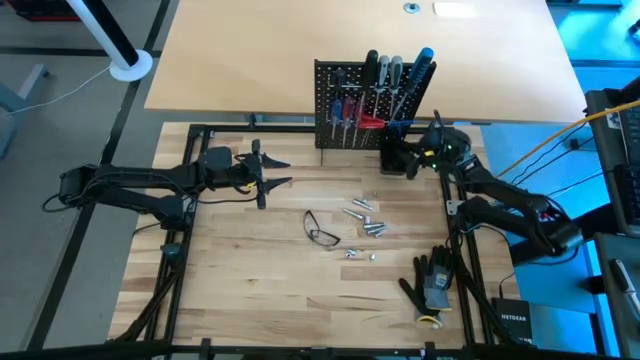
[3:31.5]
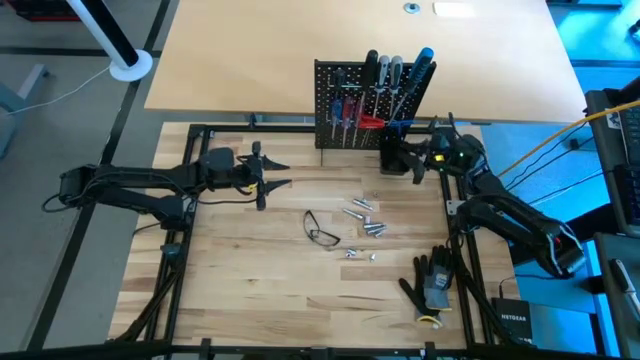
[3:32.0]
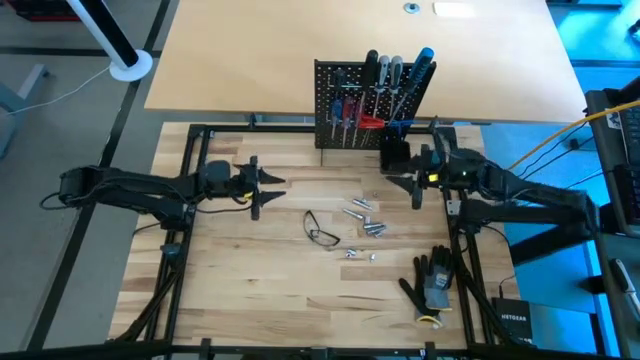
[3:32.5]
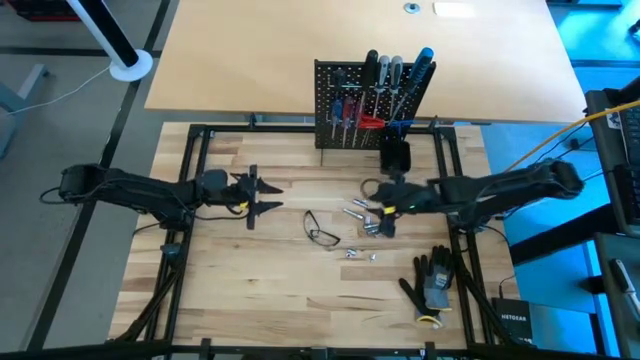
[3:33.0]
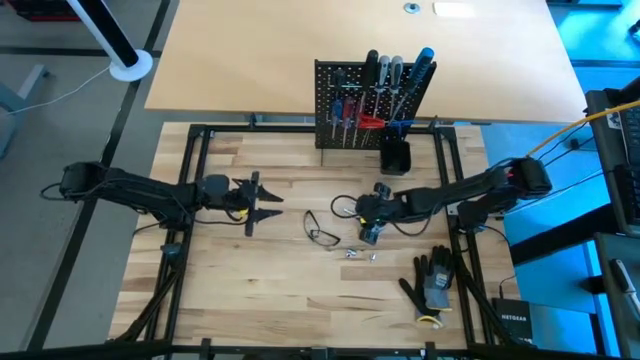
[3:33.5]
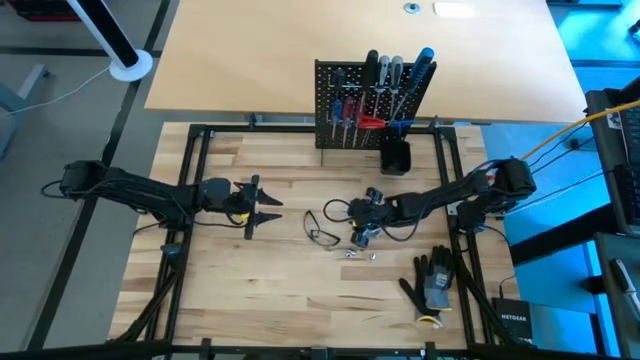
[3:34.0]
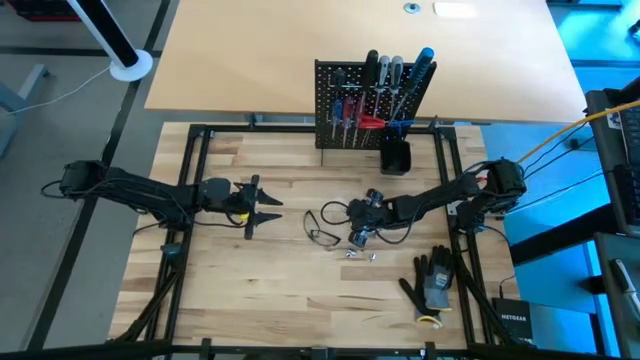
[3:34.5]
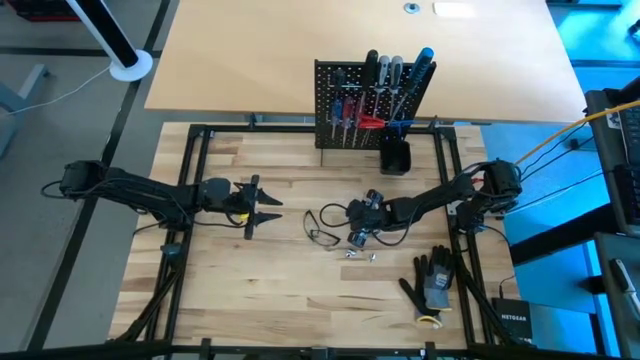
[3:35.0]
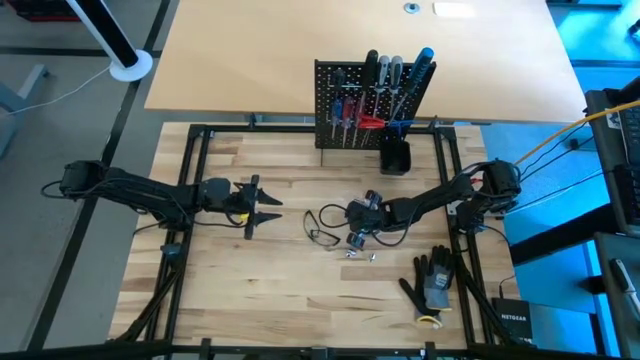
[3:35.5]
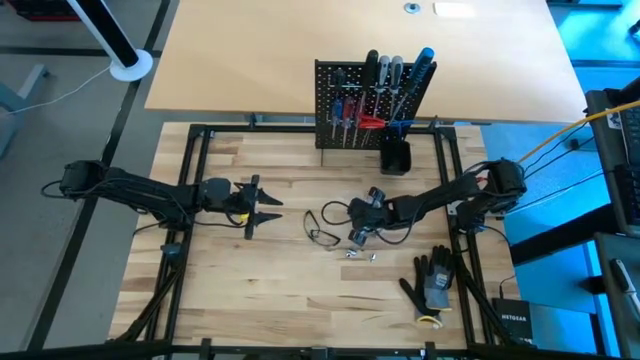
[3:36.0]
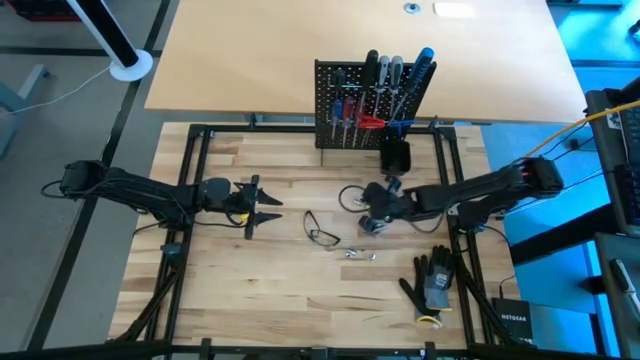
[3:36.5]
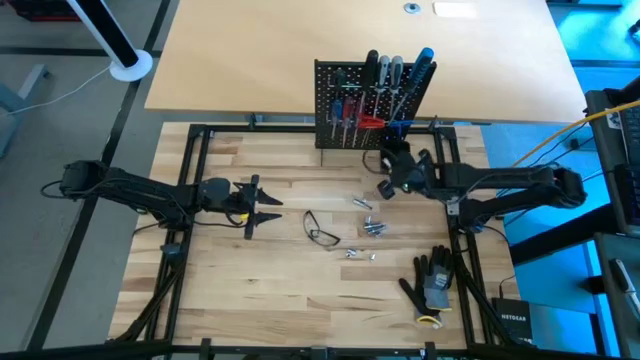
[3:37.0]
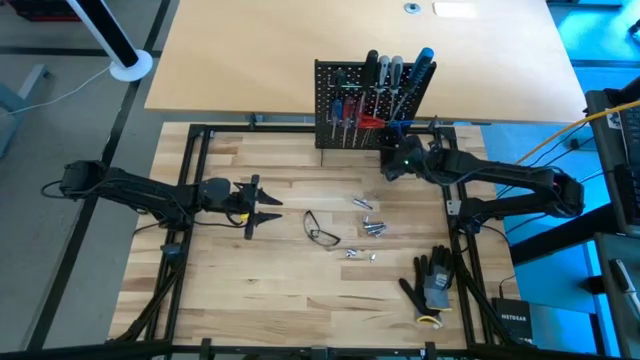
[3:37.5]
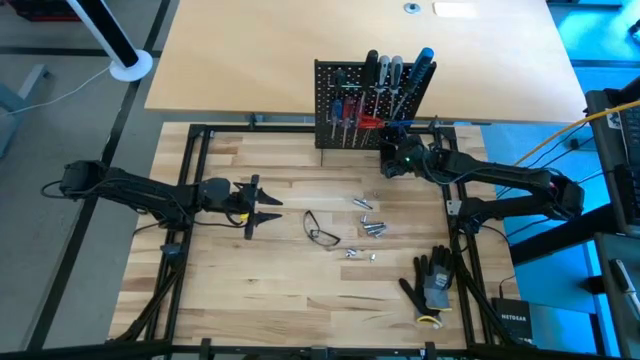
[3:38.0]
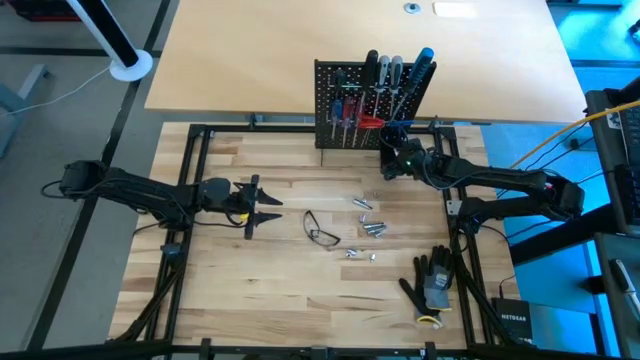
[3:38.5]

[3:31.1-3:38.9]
Task: Hang tools onto peg board
Put the silver extension bar in the black bin on the peg board

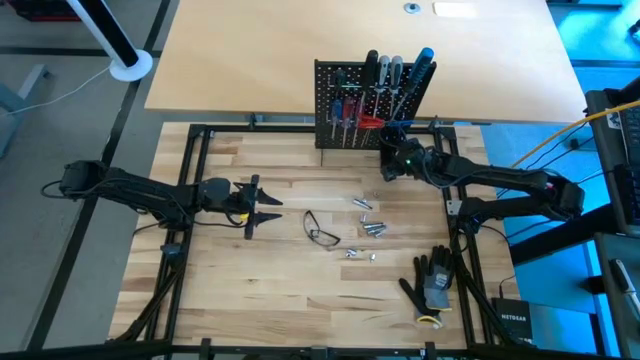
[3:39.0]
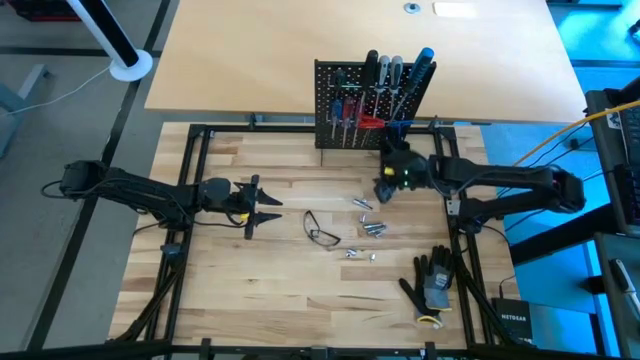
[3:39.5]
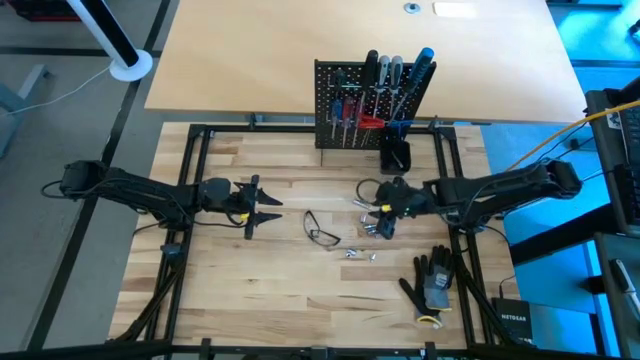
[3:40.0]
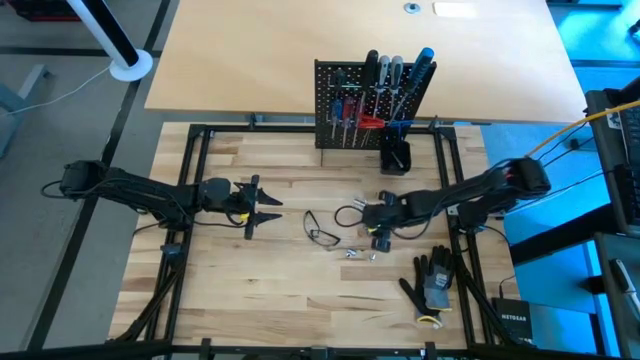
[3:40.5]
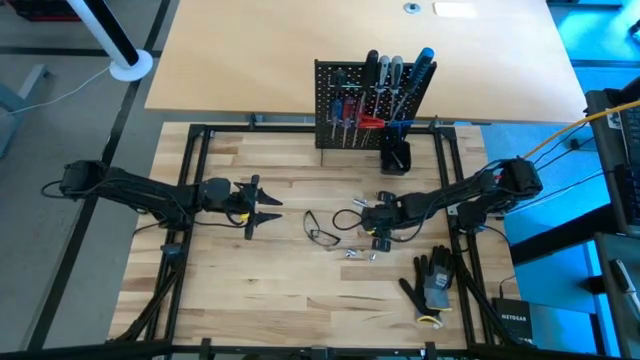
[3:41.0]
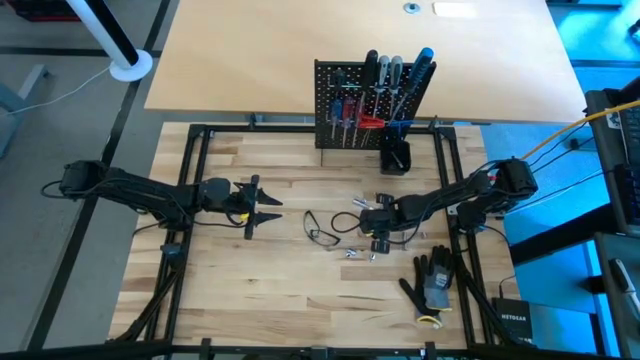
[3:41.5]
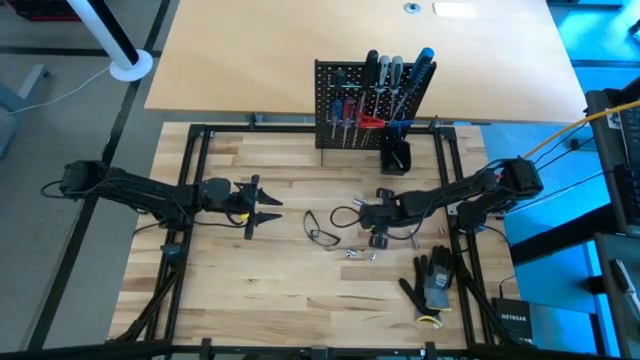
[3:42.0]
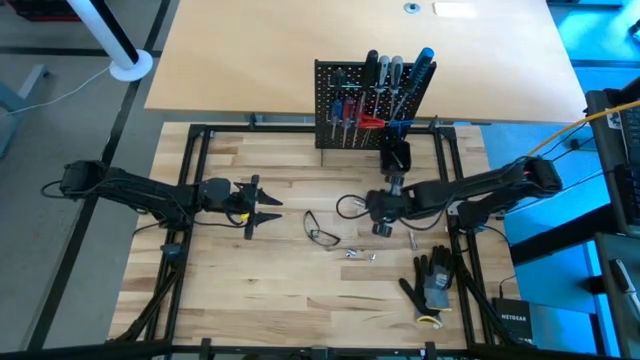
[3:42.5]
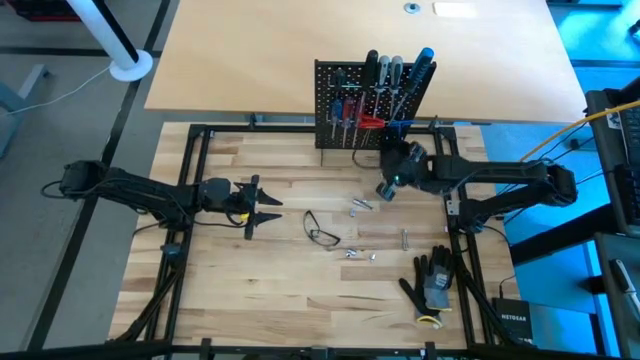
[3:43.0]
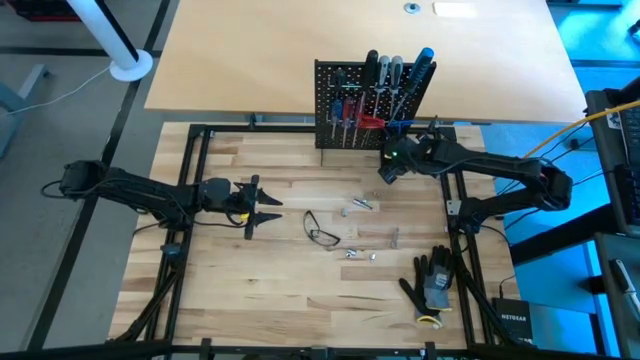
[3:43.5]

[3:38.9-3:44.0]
Put the silver extension bar in the black bin on the peg board

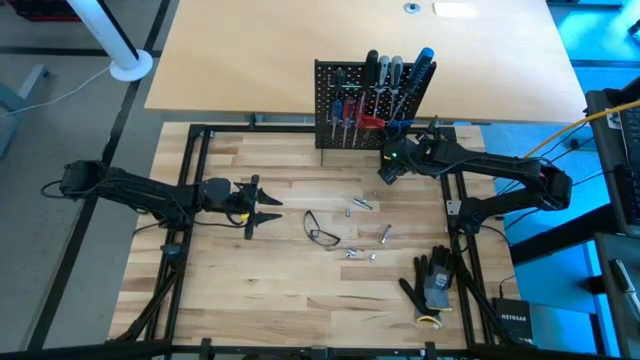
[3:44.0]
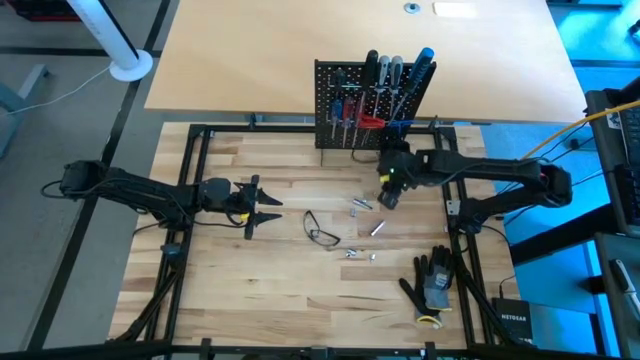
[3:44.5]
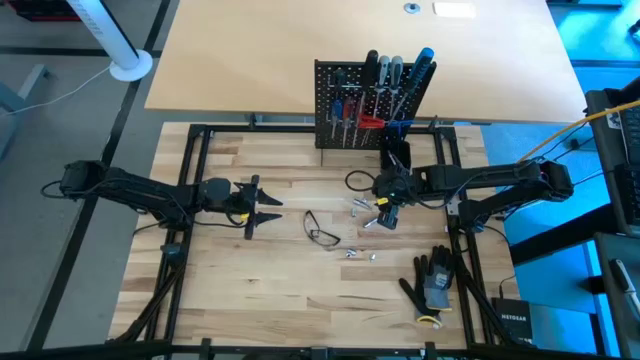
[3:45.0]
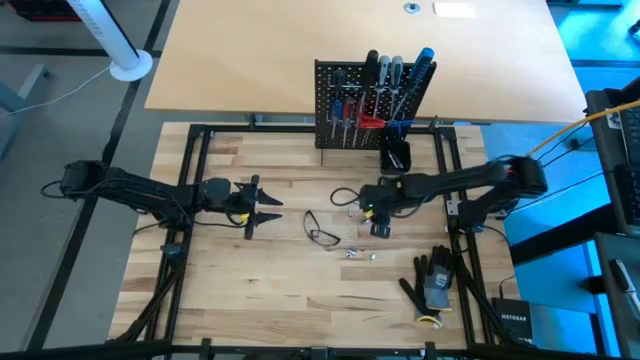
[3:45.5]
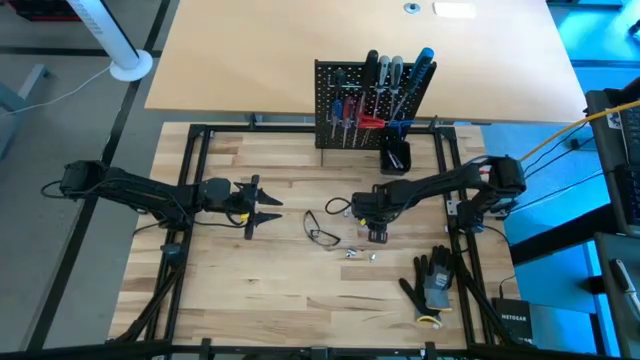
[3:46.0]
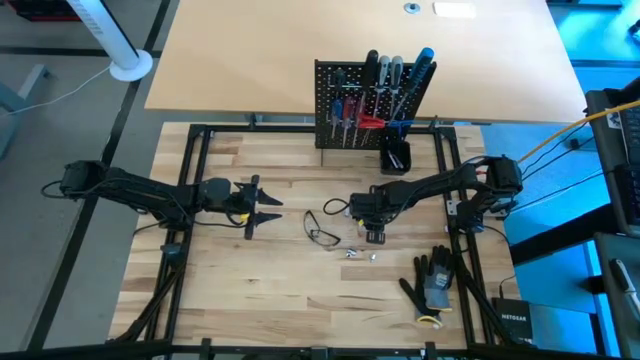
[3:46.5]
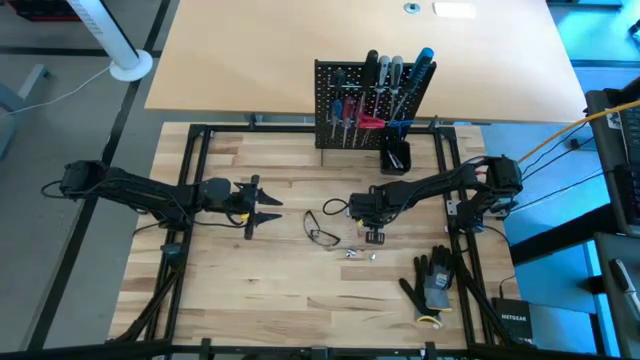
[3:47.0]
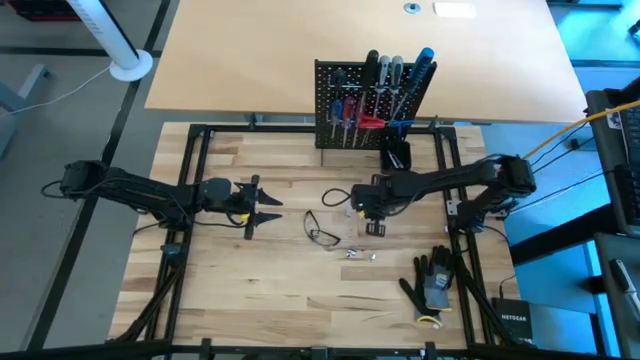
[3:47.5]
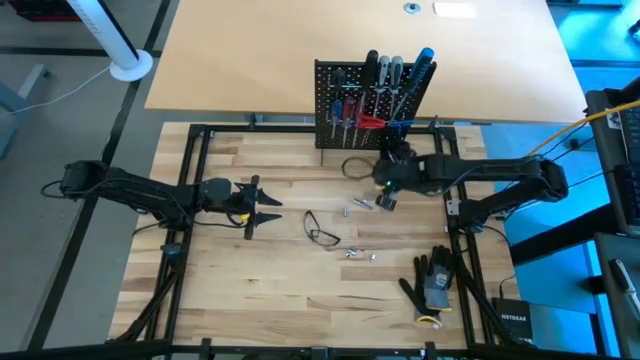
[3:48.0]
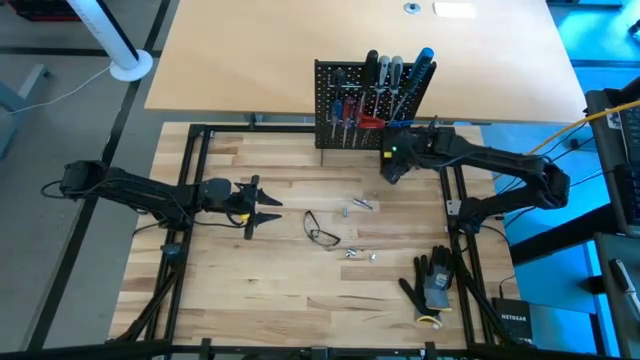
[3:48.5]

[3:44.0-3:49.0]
Put the silver extension bar in the black bin on the peg board

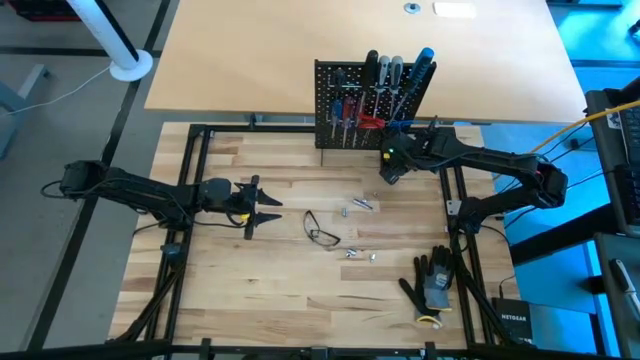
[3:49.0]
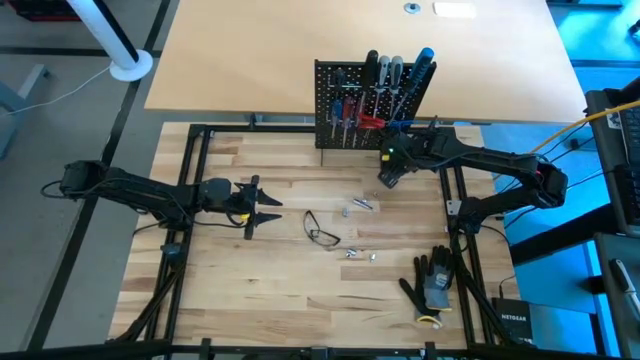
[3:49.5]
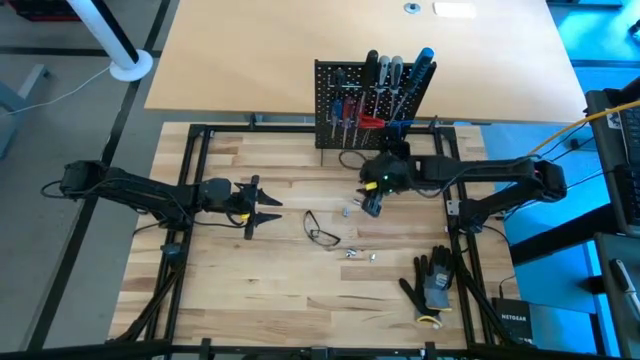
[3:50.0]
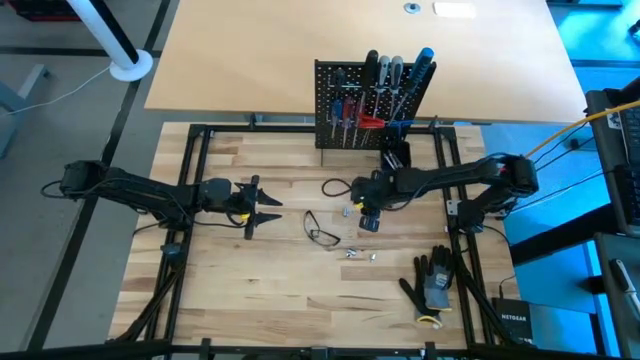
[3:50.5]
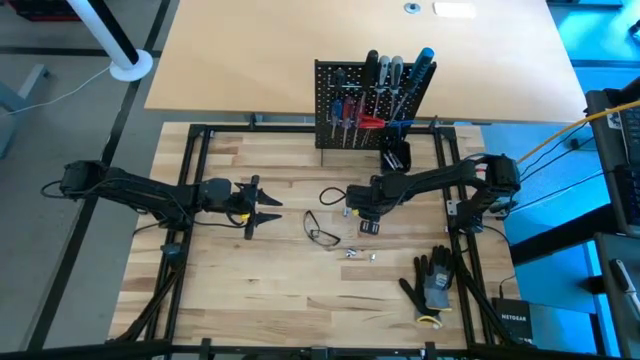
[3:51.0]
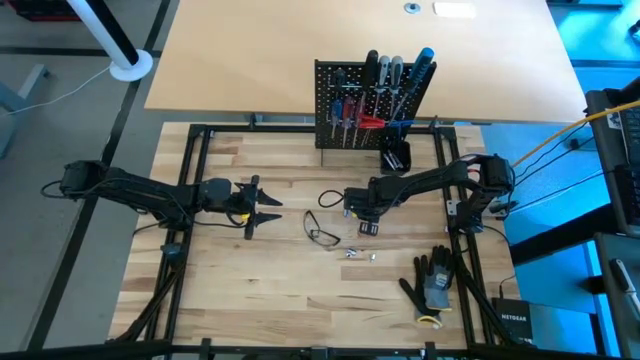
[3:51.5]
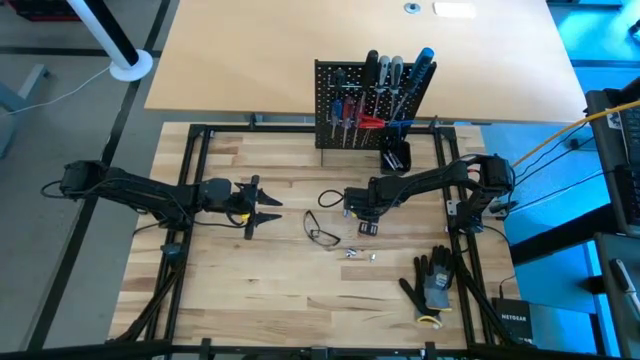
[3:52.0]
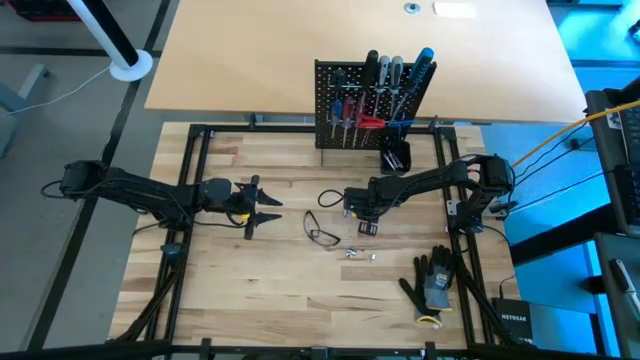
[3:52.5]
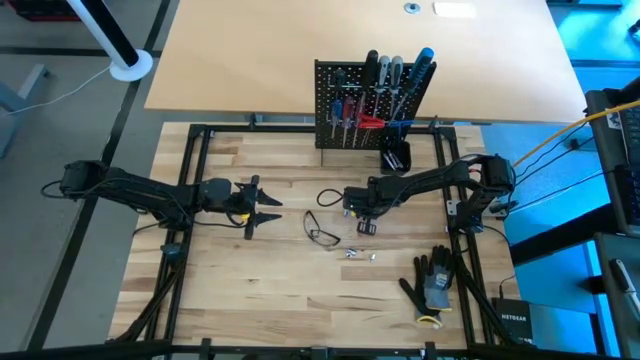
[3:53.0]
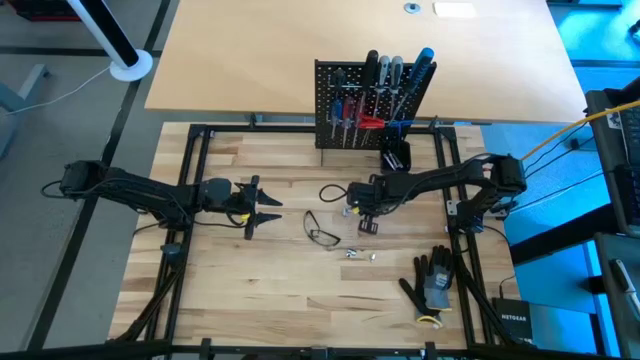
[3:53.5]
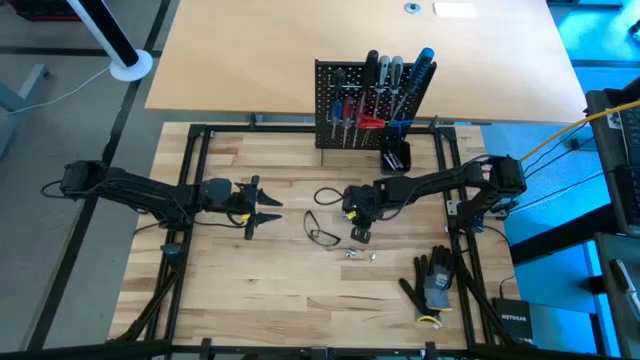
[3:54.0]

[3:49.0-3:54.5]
Put the silver extension bar in the black bin on the peg board
